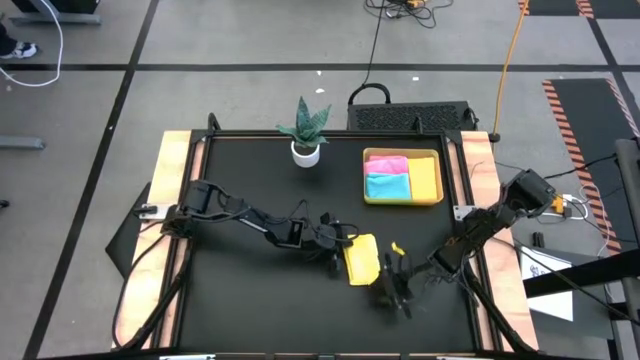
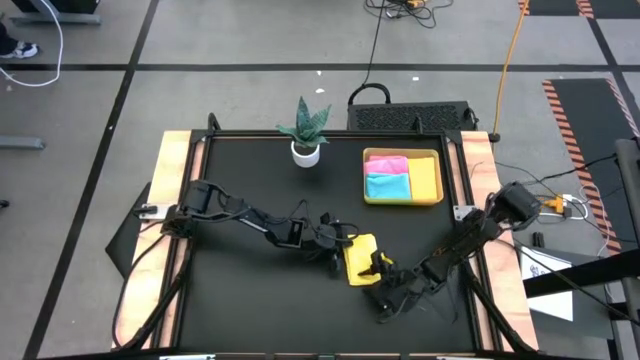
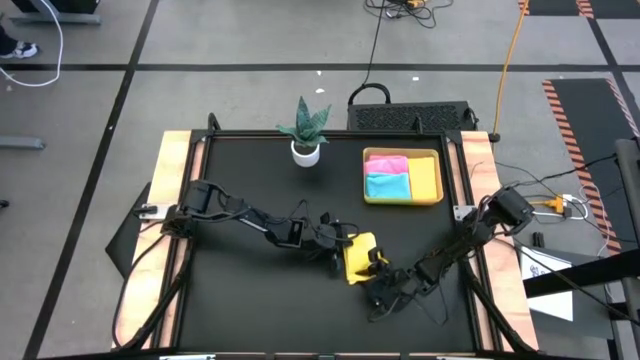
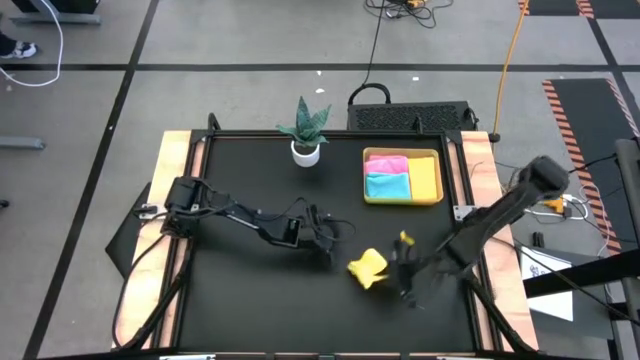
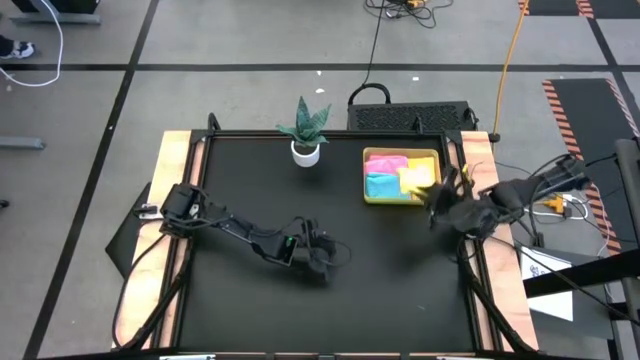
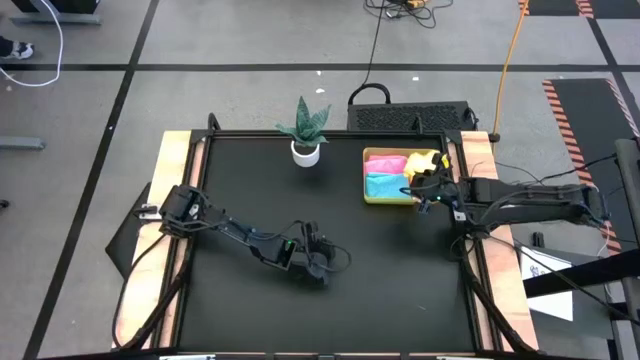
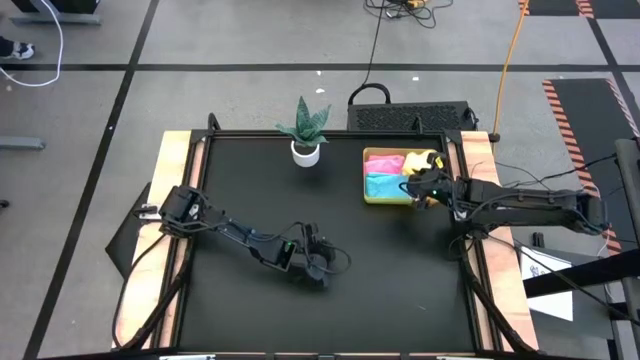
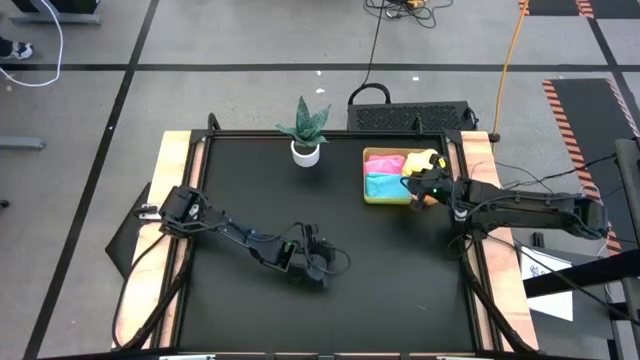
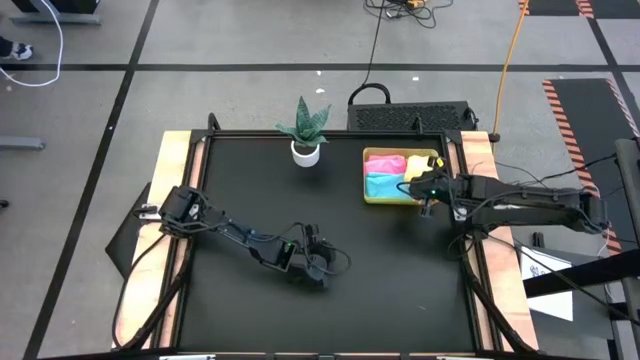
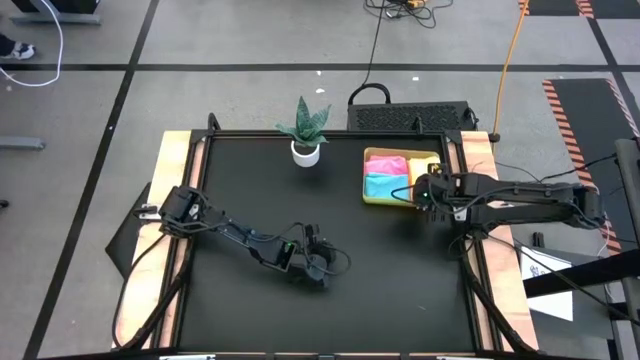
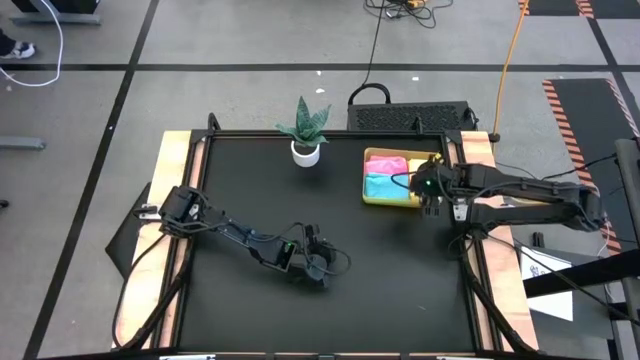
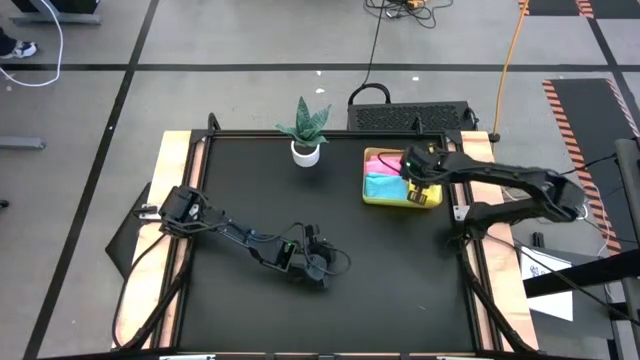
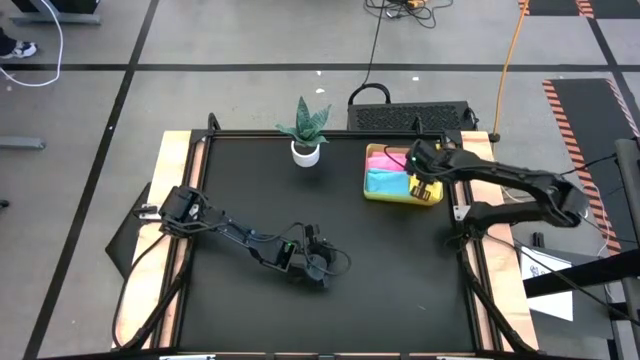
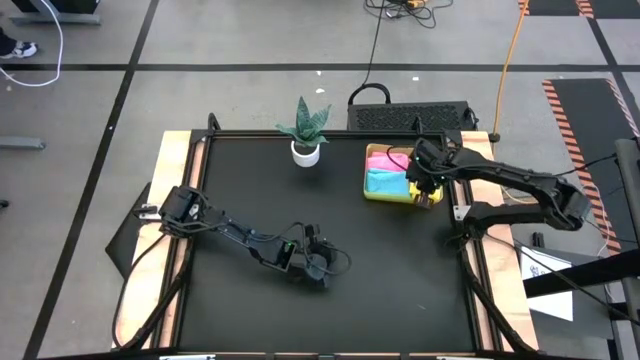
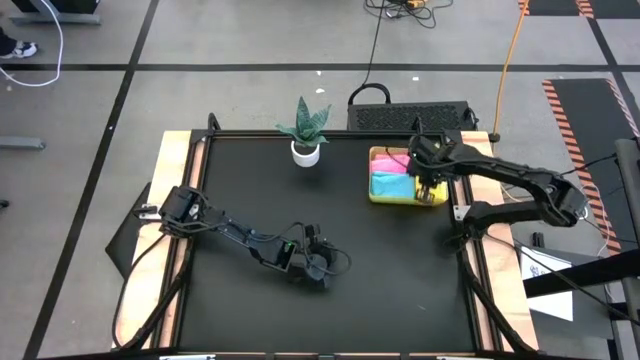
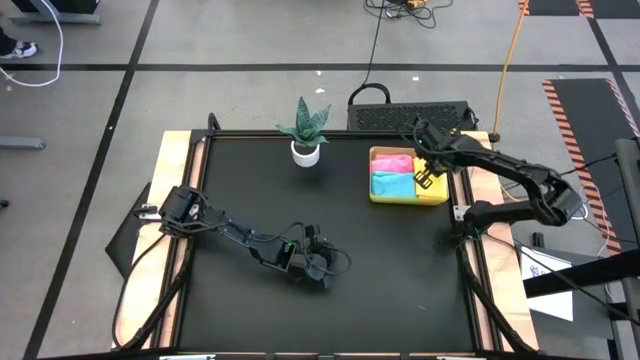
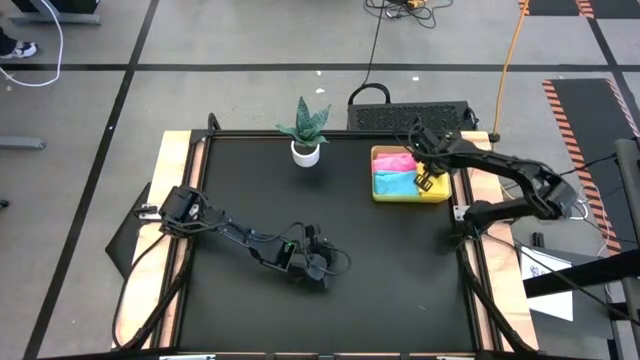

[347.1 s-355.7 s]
Task: Fold microfiber towels
Put the folded yellow microfiber cloth into the yellow bin

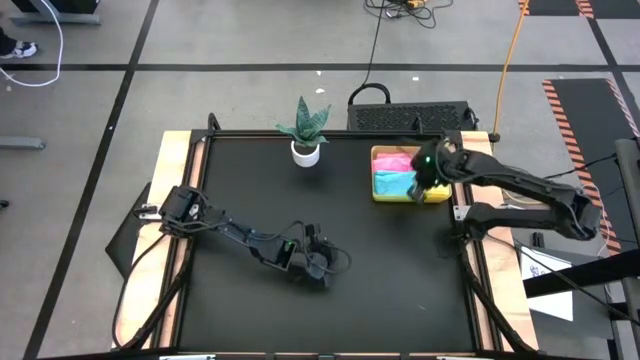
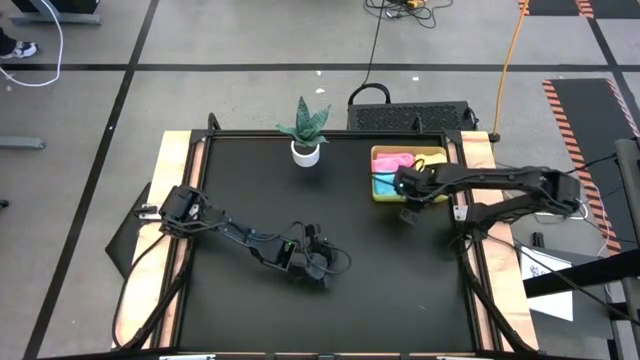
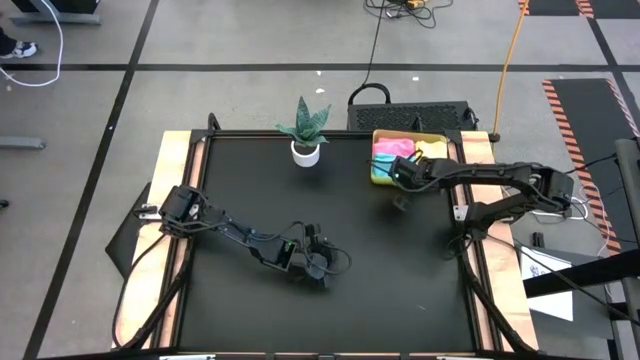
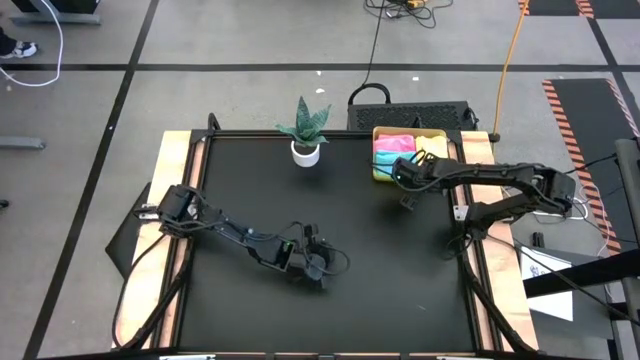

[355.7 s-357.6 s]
Adjust the yellow bin

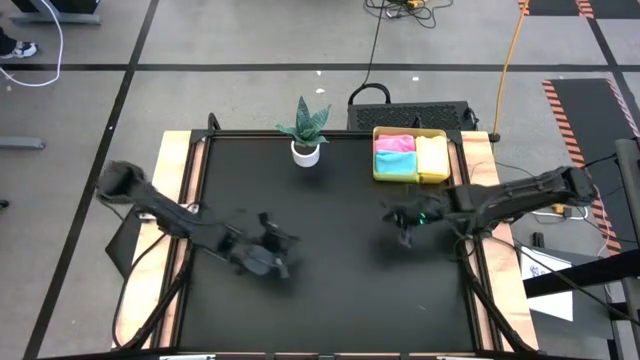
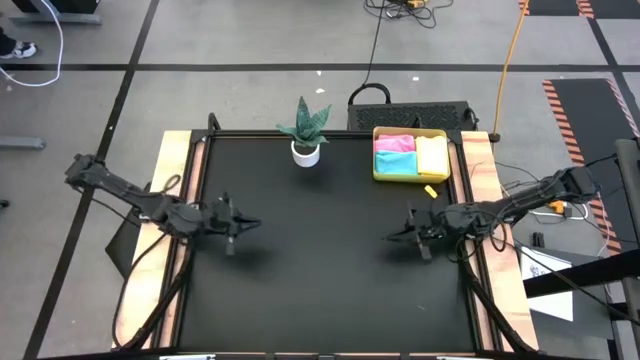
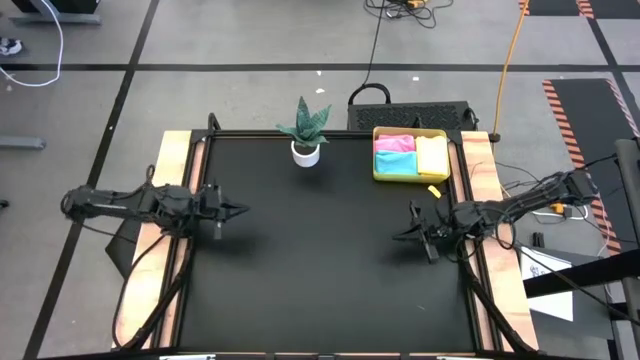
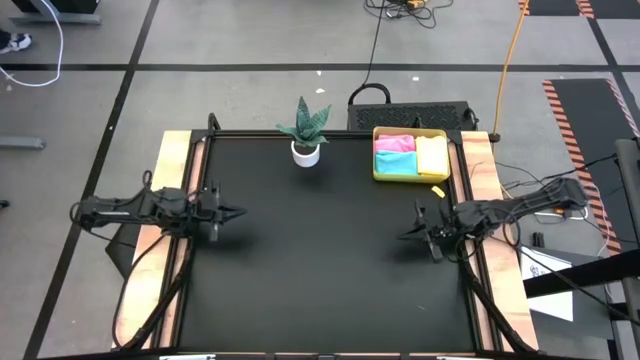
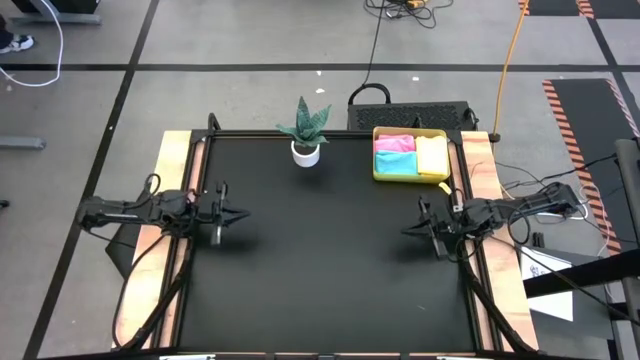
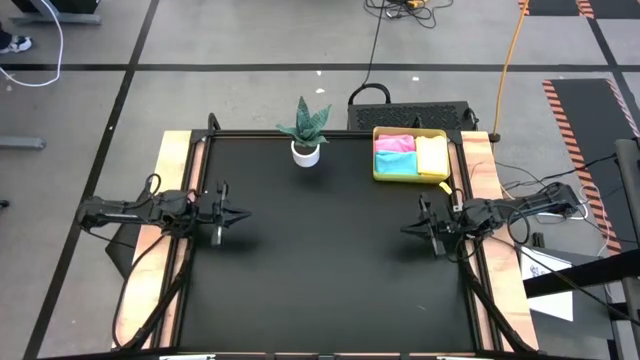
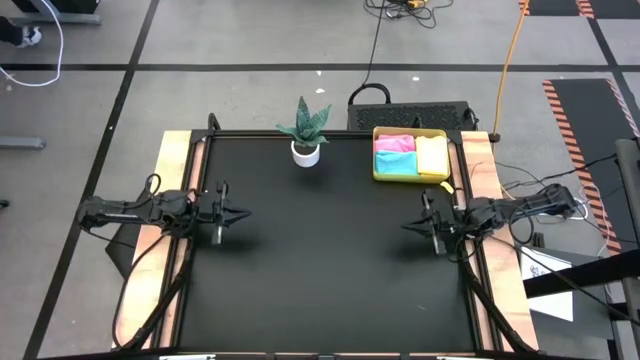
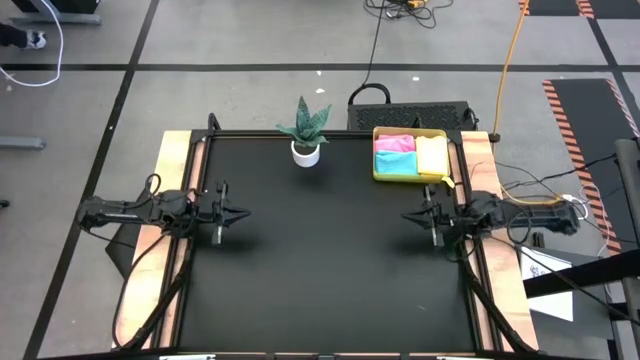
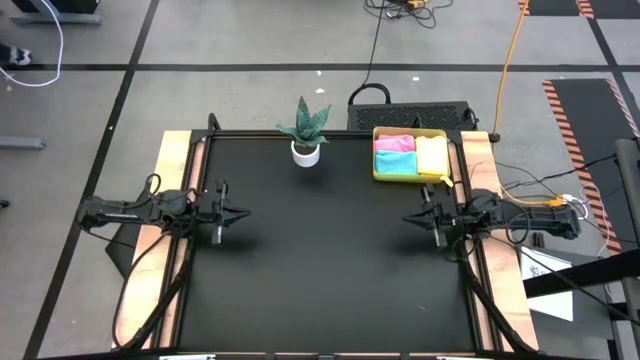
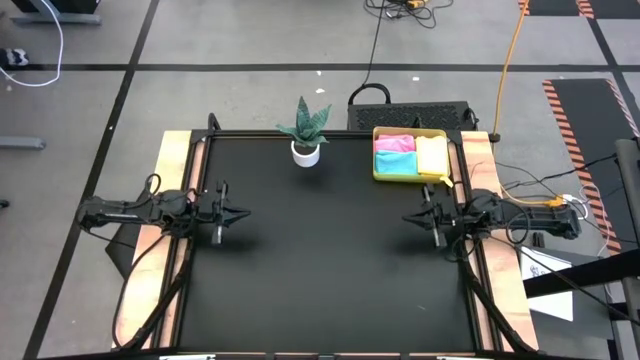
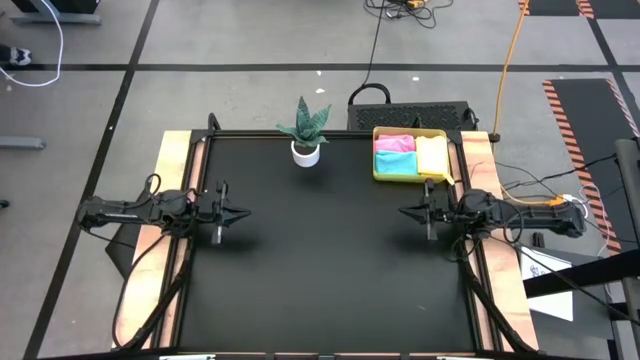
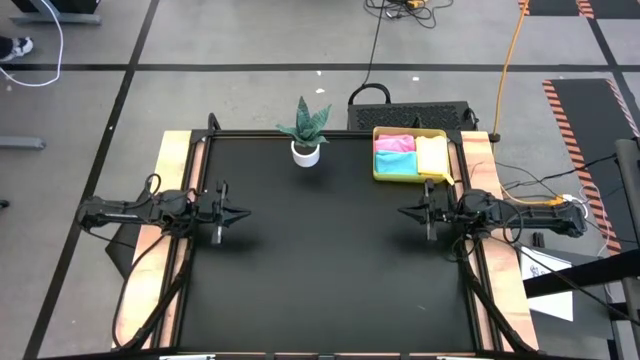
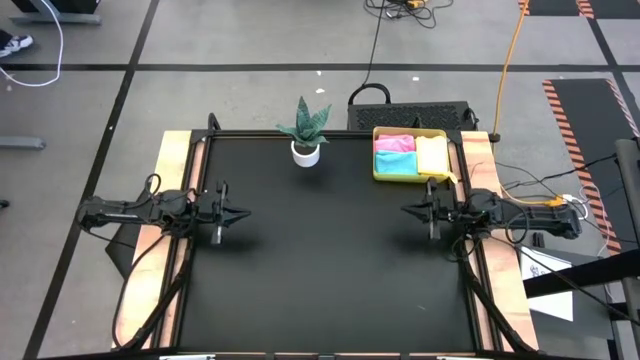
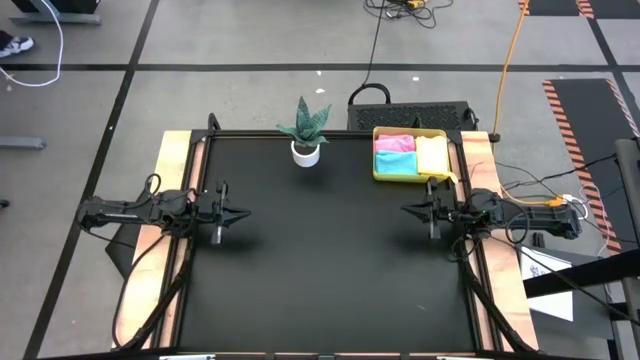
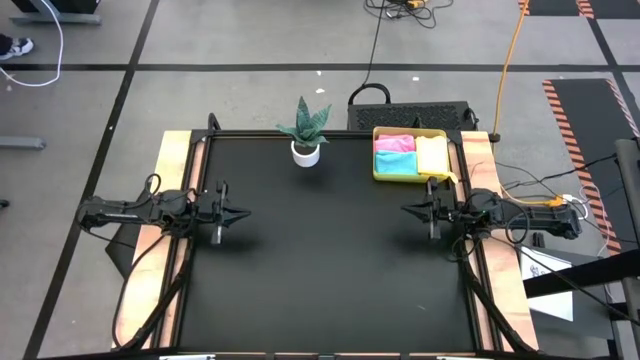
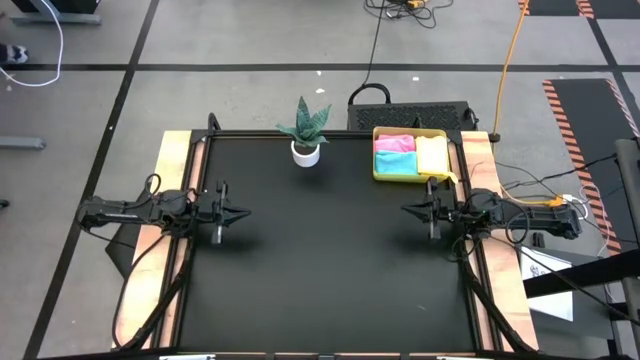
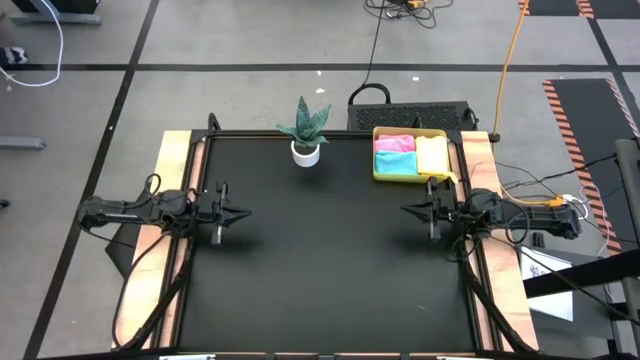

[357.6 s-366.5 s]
Return to Home Position

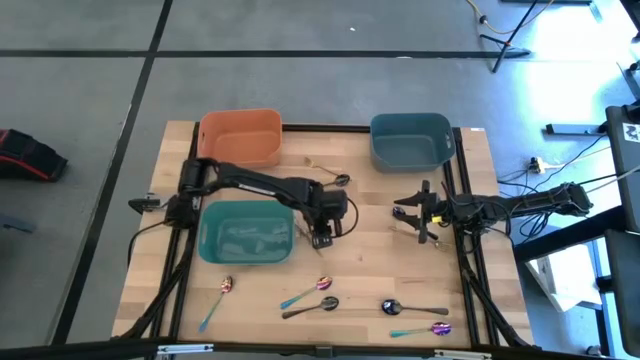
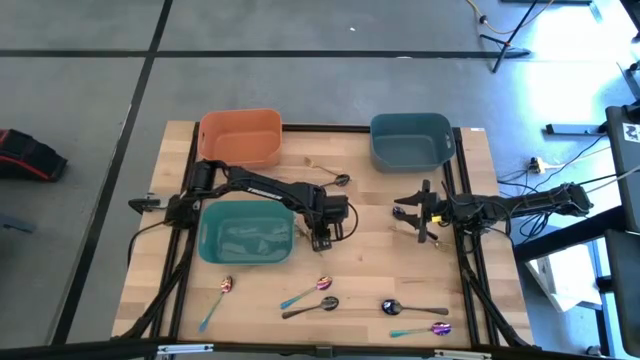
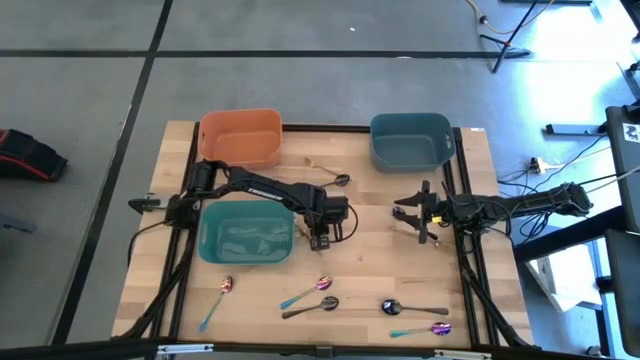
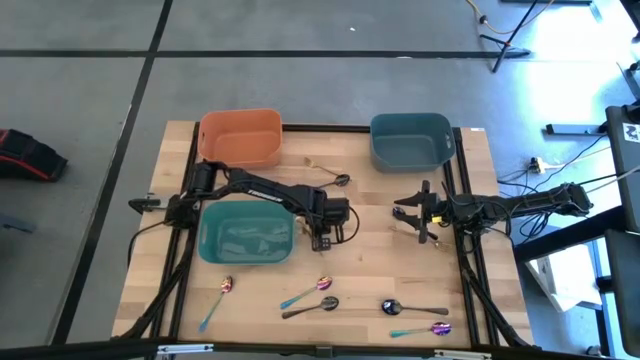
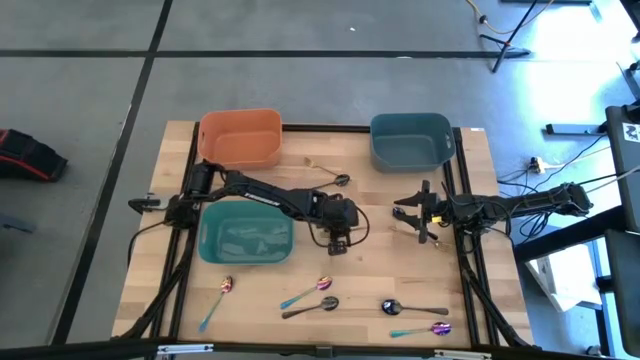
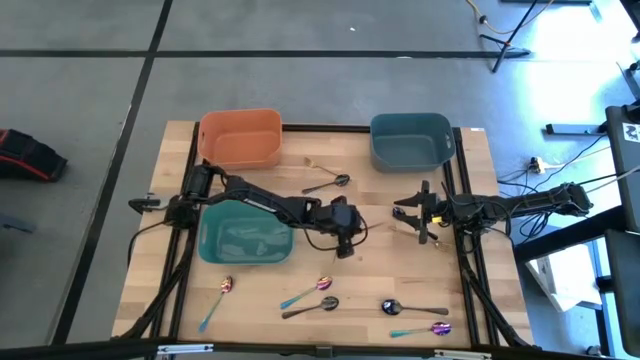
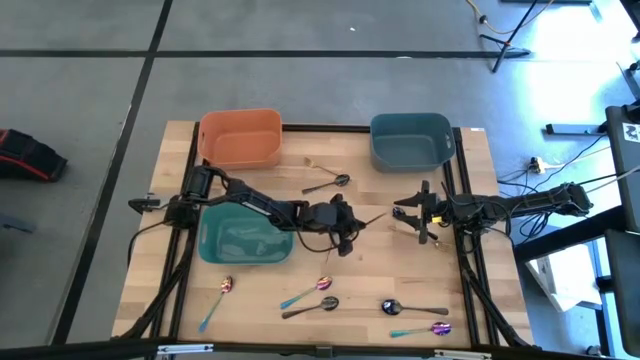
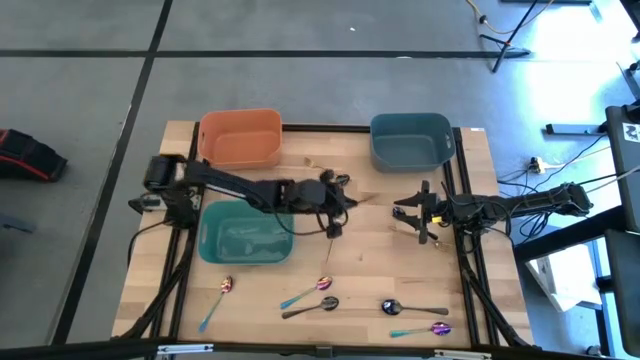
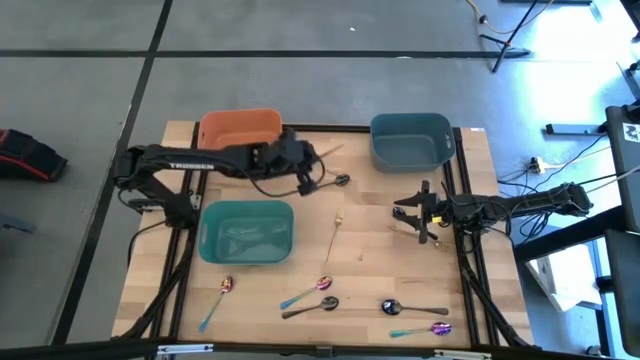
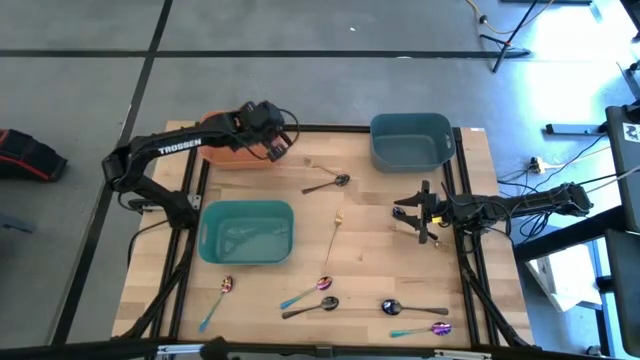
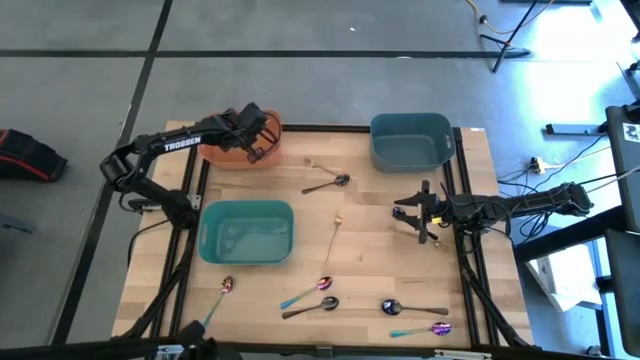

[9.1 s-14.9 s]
Task: Sort silverware by color (type)
Put the middle left yellow fork into the orange bin
